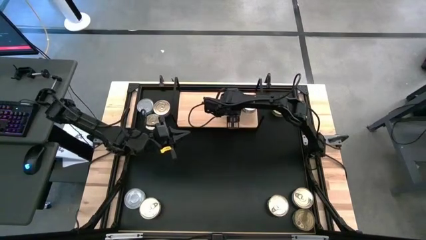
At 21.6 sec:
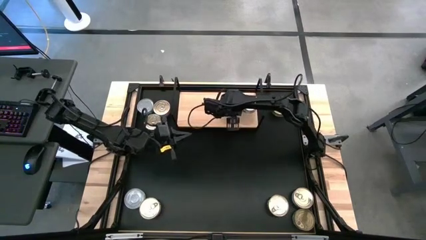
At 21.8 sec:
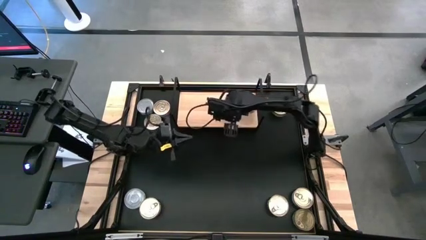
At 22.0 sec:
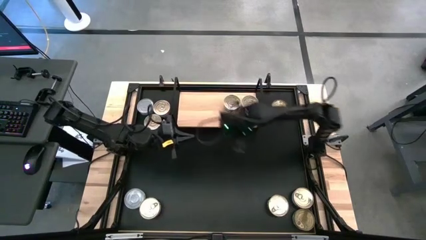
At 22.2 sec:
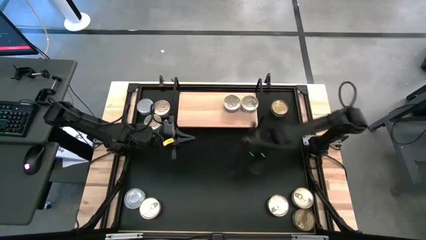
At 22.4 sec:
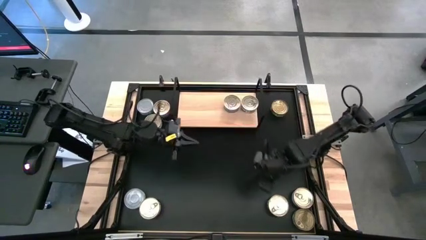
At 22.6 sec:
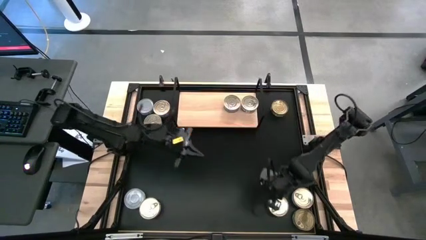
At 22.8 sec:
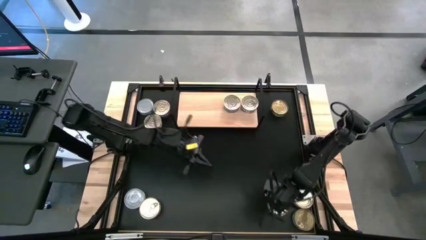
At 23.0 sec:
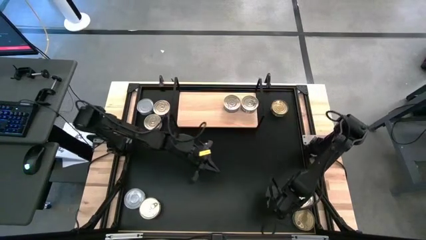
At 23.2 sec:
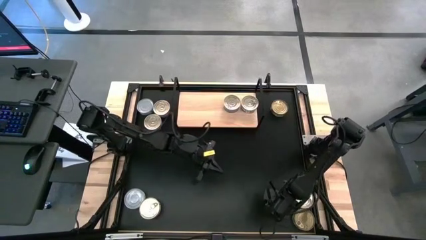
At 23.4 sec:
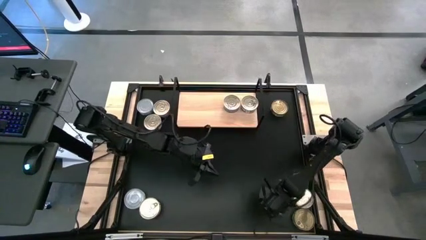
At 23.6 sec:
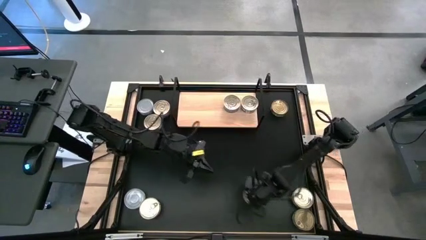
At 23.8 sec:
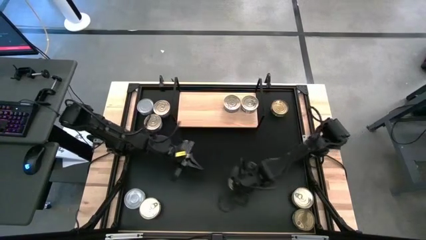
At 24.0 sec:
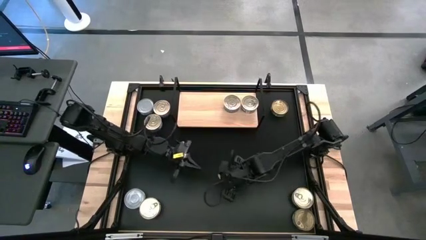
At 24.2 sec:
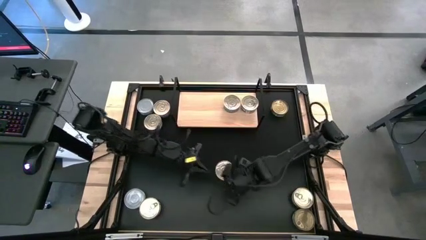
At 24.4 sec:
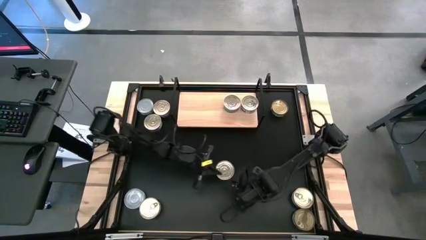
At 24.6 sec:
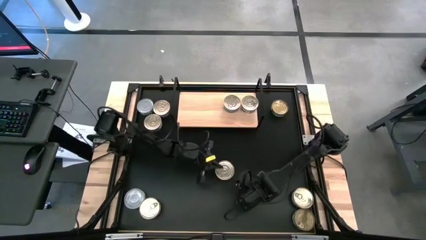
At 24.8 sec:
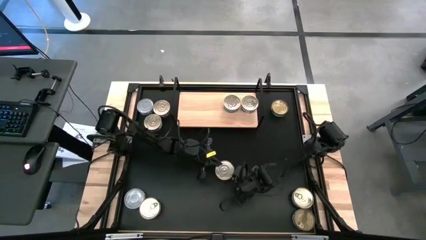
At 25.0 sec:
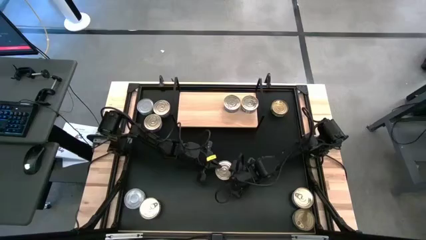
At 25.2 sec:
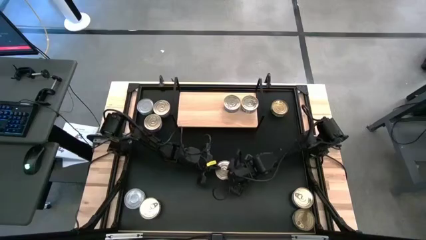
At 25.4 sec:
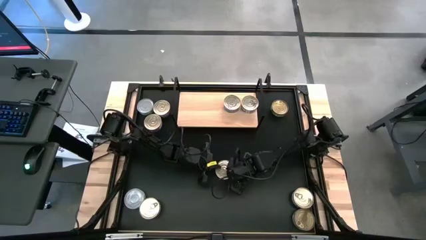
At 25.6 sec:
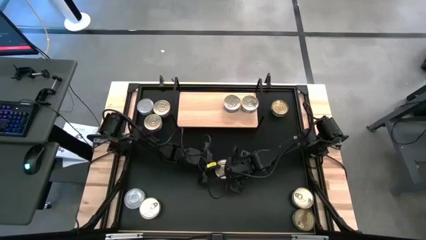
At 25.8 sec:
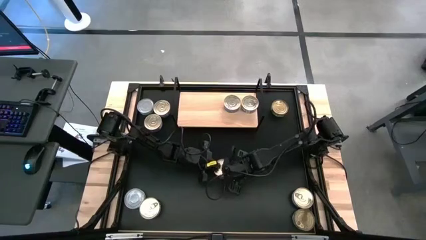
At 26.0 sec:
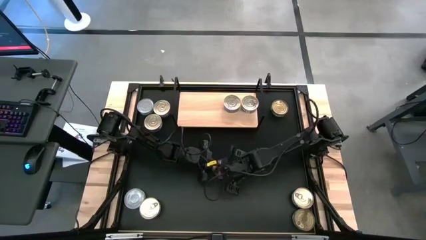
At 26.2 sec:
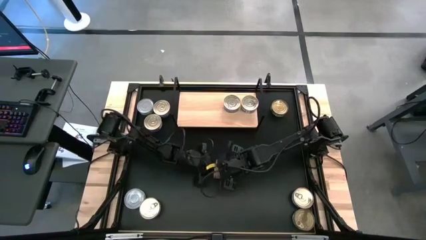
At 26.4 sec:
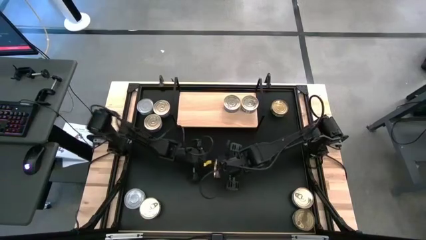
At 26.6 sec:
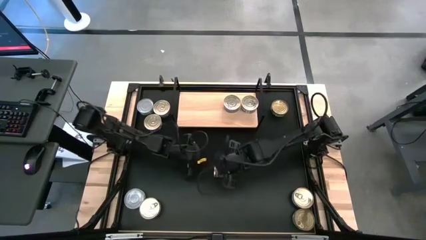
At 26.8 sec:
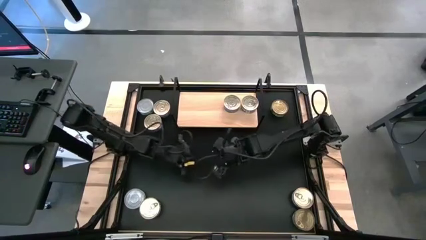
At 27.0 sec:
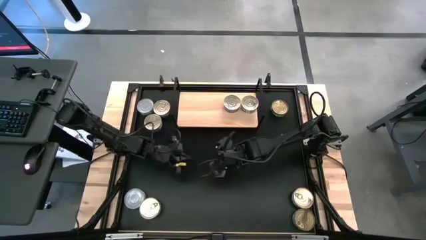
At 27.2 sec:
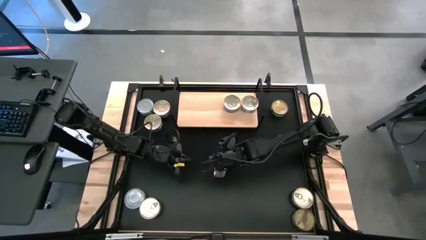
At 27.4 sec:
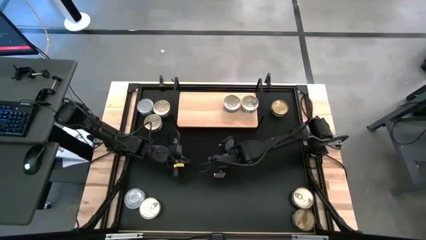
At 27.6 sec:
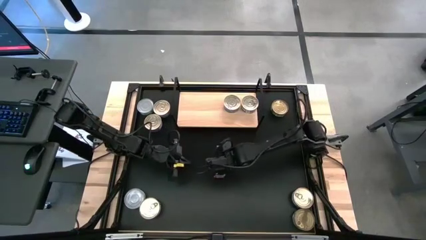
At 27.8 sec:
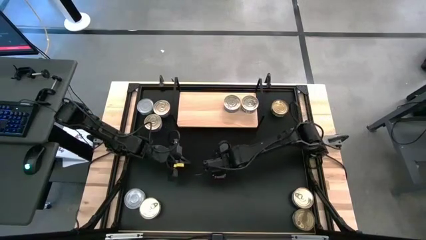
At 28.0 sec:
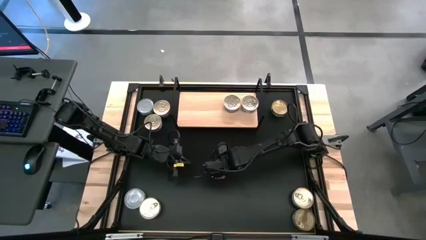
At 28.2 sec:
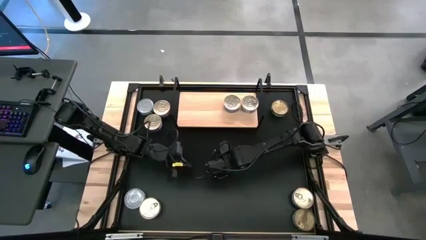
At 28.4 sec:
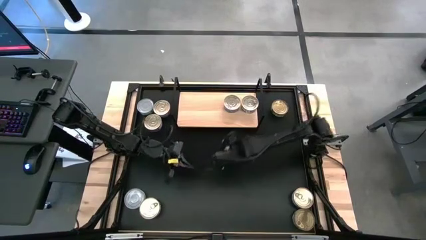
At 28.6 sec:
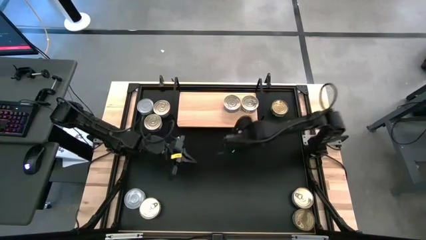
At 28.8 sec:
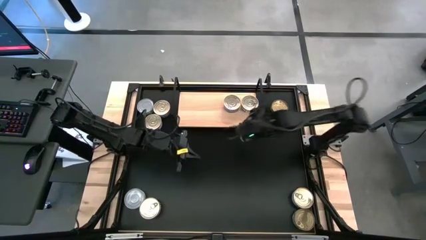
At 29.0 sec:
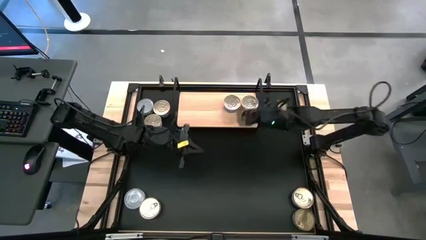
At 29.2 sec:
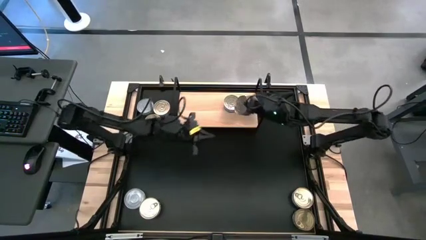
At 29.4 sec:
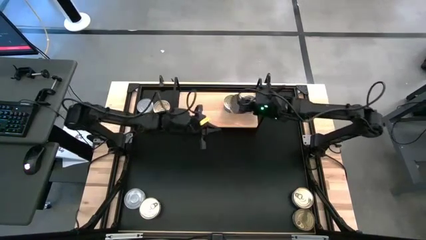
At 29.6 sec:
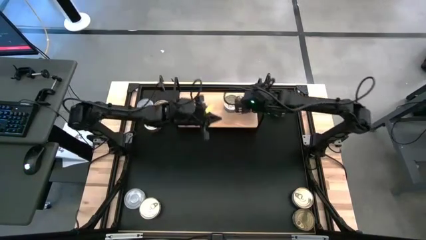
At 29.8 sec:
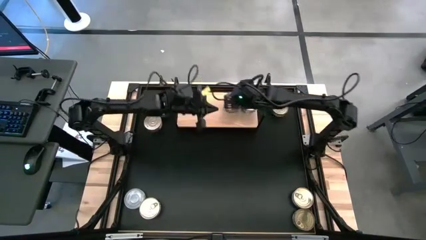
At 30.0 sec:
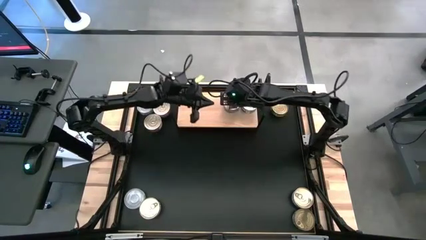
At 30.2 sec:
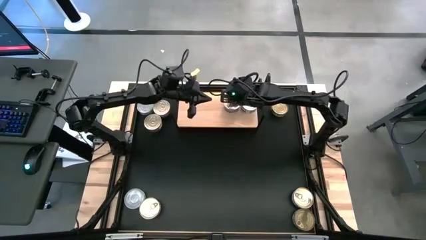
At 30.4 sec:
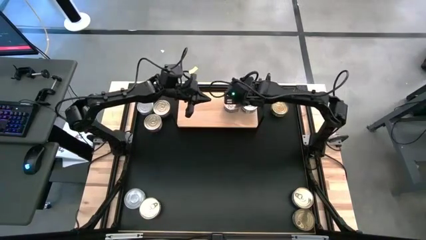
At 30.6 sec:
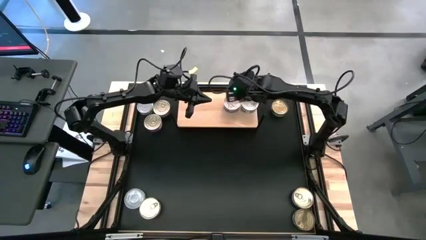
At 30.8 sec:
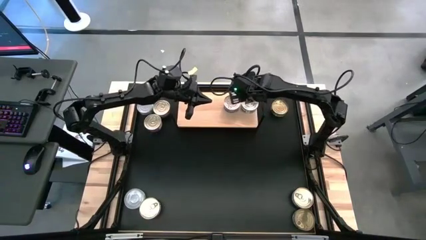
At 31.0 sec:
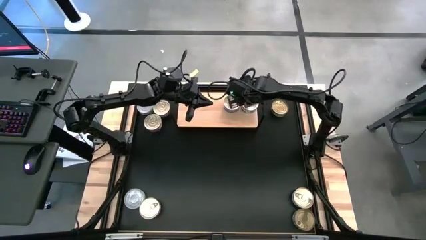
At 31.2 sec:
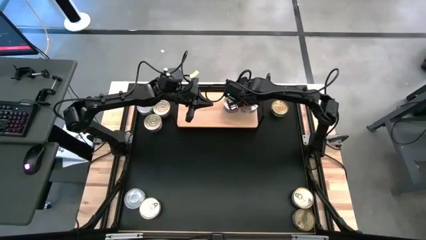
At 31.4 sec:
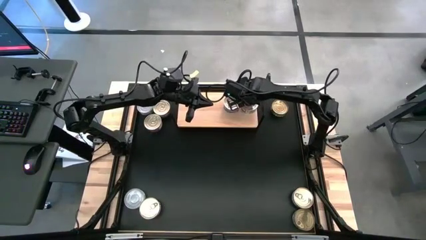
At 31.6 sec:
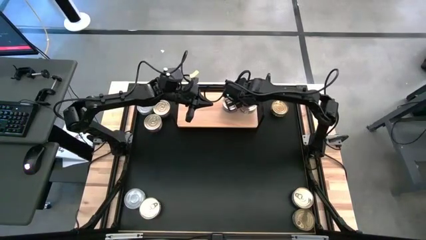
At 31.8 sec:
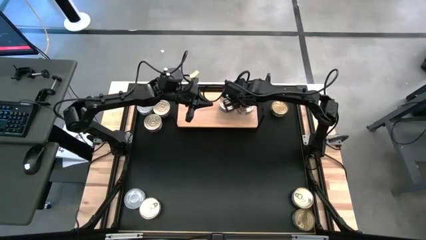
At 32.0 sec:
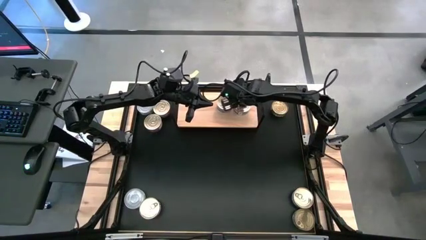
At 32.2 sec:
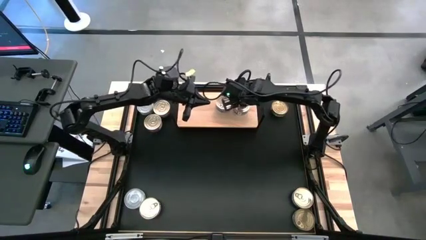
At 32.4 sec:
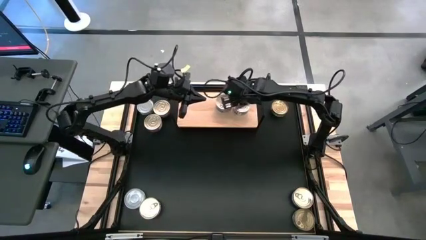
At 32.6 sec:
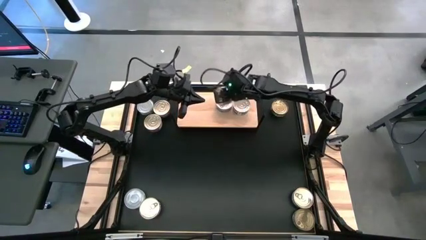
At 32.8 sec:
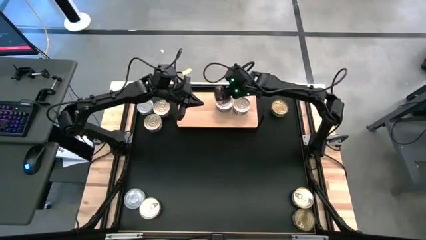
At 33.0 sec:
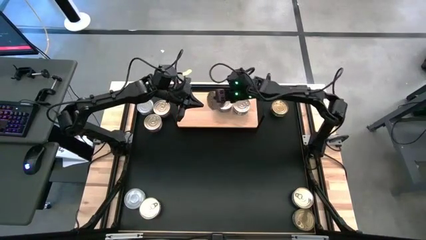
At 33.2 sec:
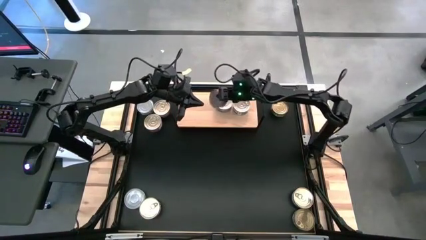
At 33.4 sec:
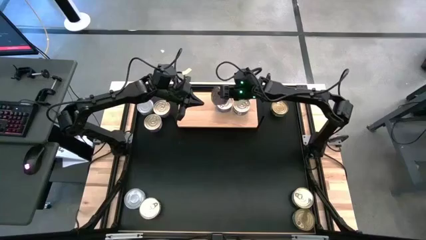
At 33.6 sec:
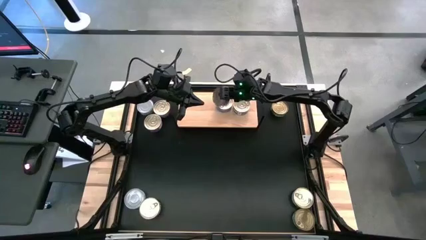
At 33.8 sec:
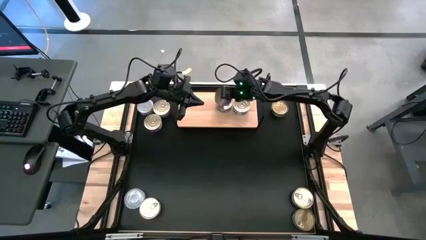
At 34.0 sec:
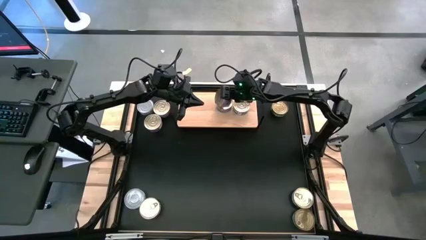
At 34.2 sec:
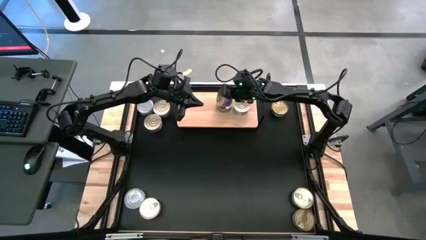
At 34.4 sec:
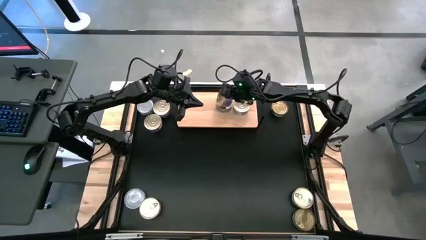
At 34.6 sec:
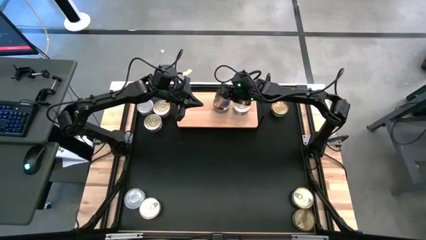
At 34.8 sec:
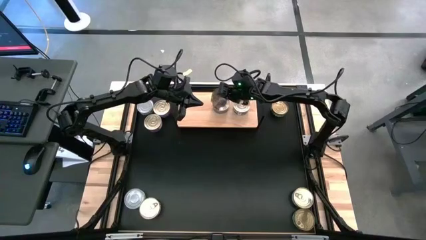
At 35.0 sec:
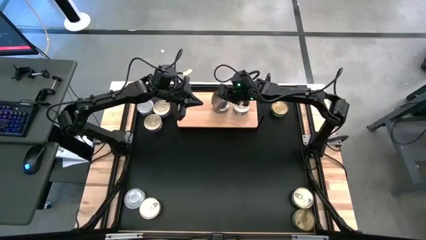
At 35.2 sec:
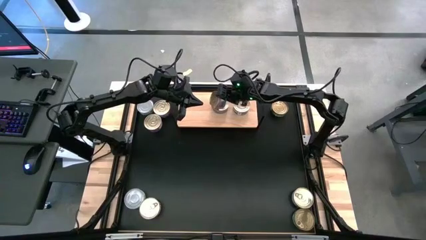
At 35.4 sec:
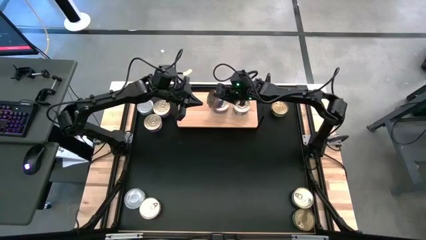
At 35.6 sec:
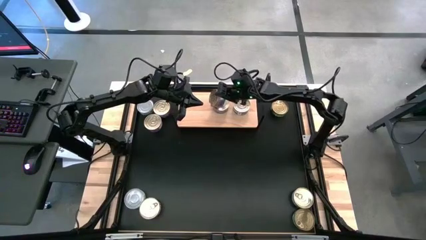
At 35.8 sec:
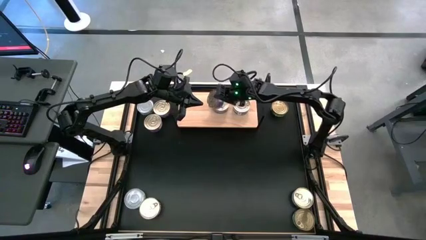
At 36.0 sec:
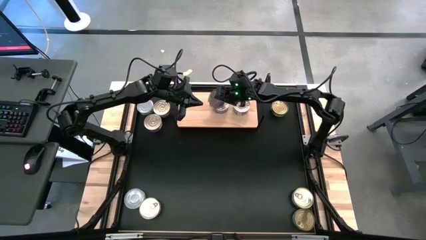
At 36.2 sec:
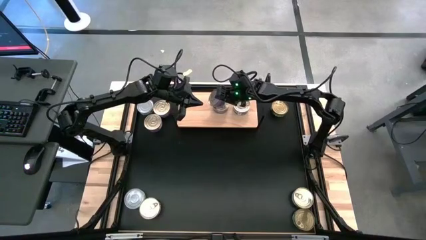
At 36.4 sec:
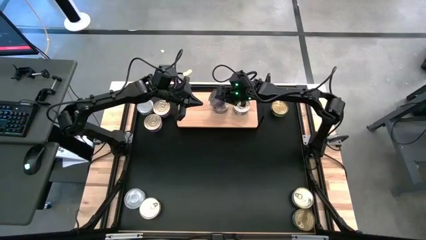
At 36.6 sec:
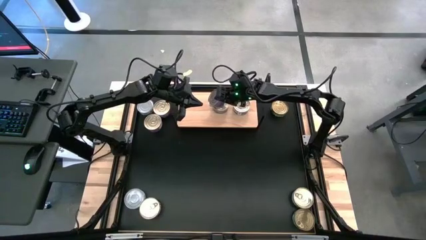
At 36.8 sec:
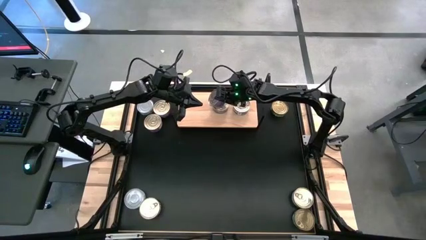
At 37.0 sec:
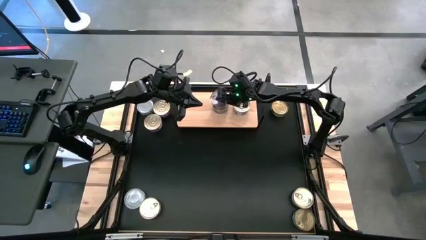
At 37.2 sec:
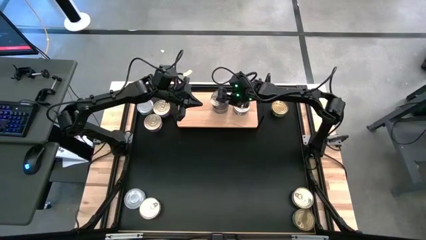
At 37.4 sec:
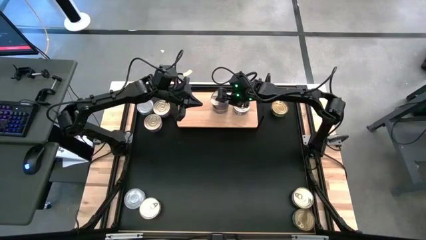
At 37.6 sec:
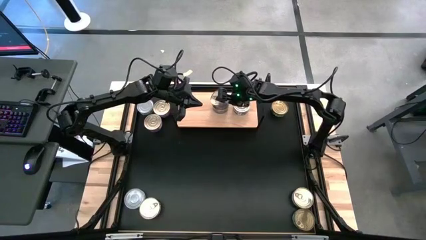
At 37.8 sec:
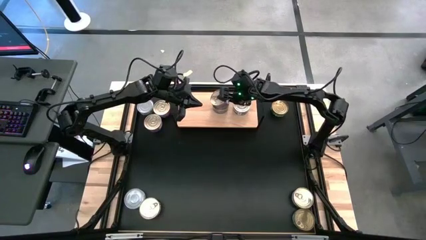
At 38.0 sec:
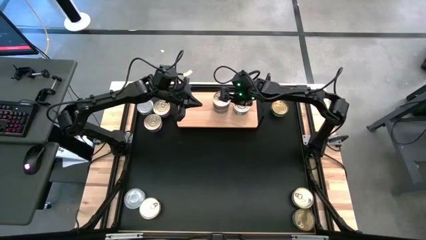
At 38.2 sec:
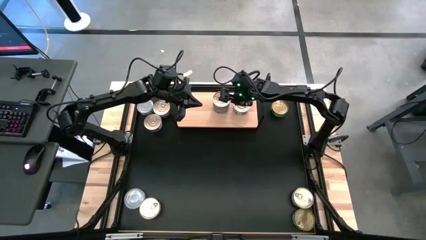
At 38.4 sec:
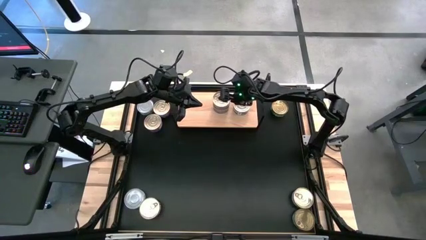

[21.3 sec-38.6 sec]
Task: Stack canned seafood by type on shelf
Stack the blue-pink tuna can on top of the other blue-pink tuna can on the shelf
